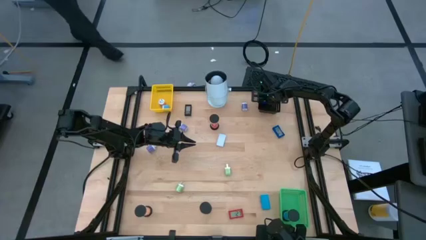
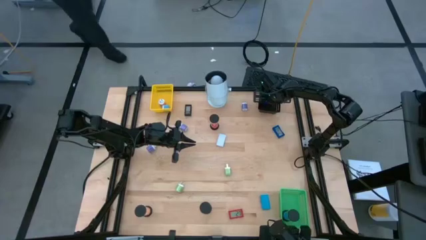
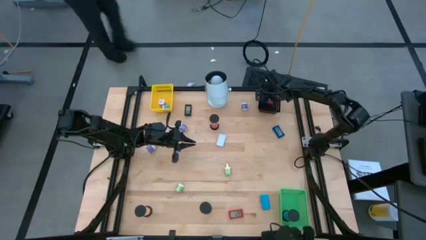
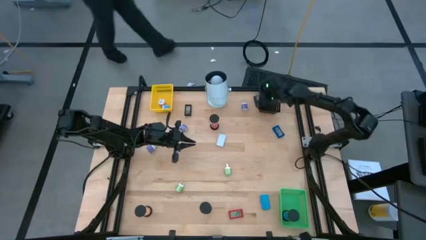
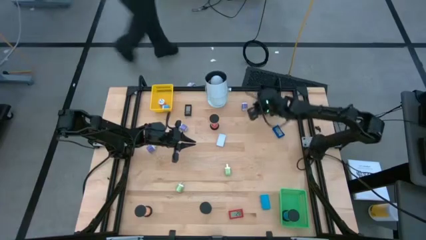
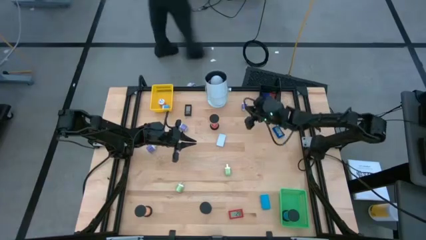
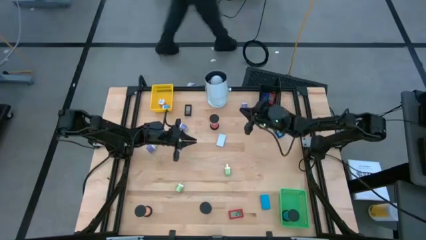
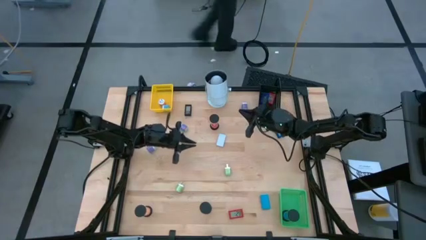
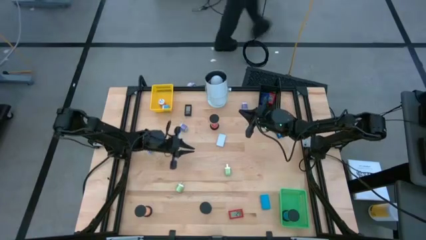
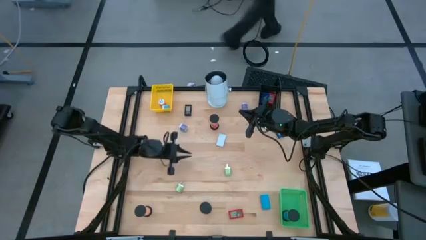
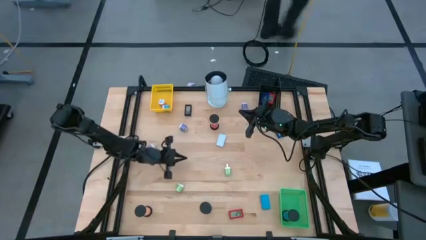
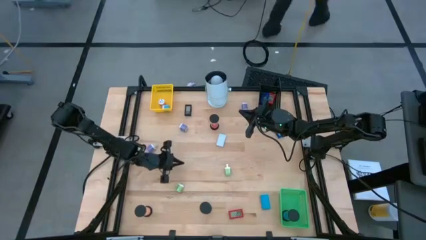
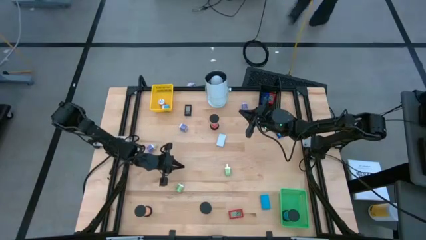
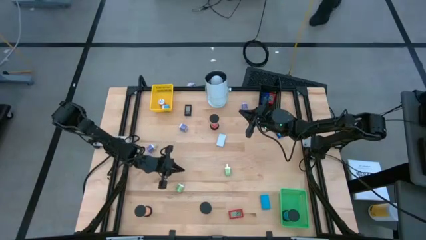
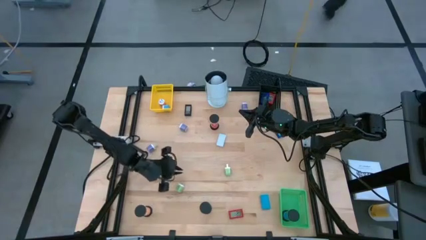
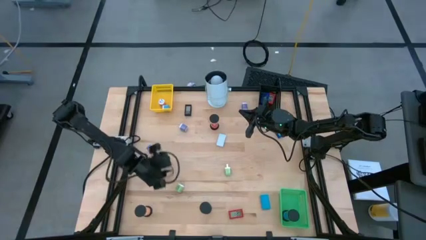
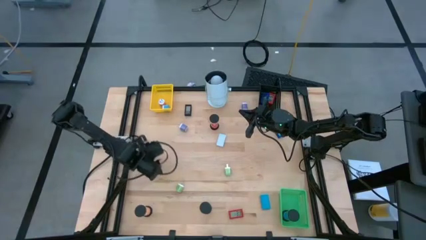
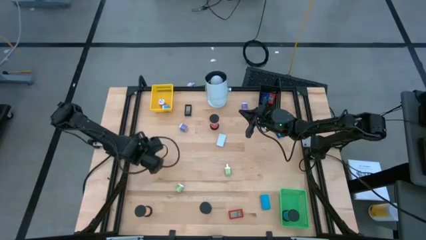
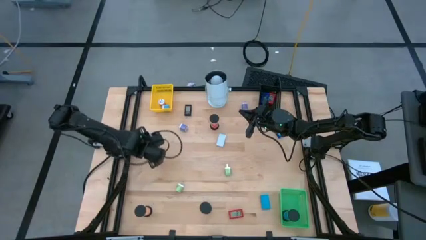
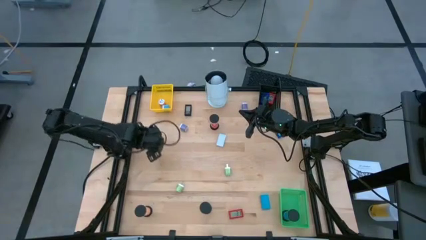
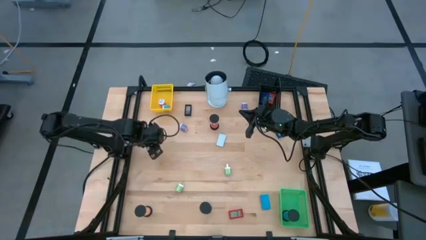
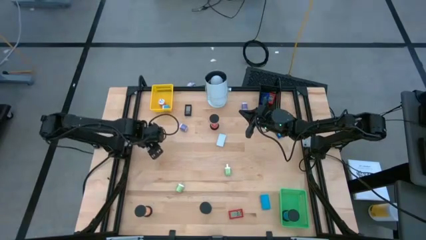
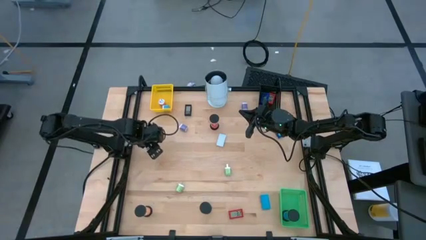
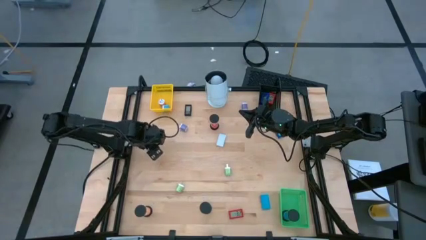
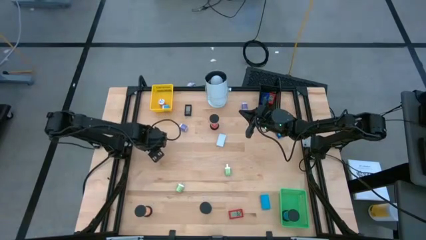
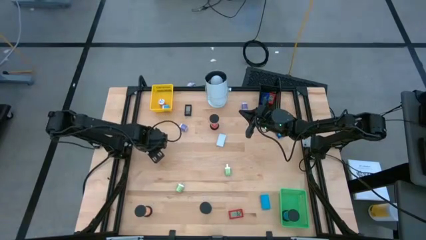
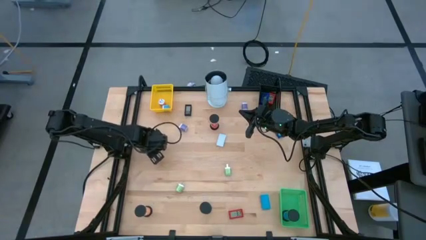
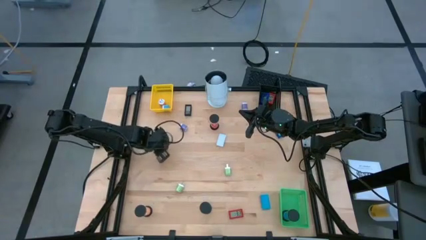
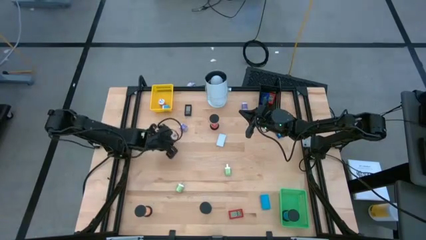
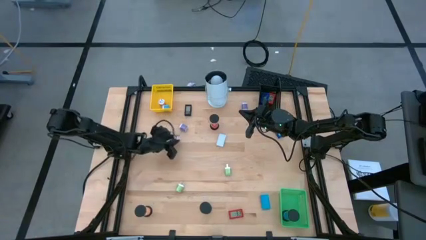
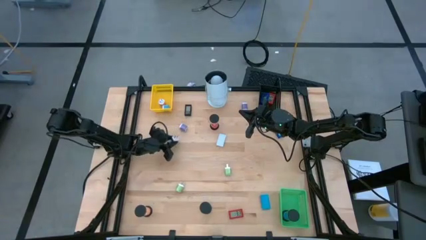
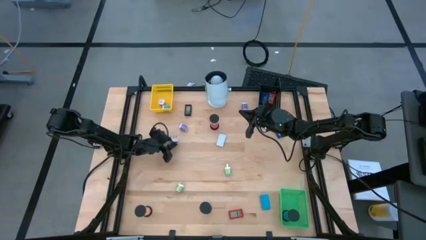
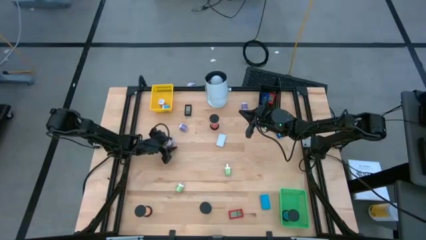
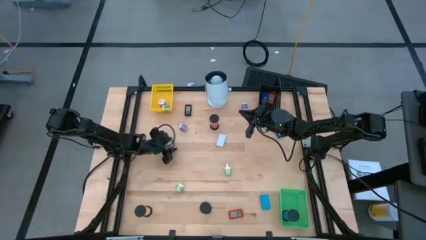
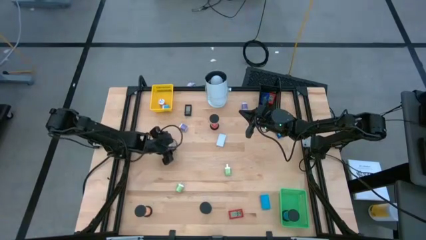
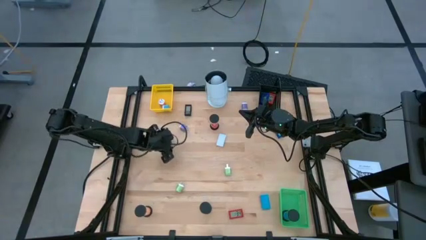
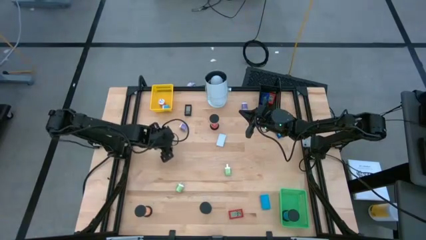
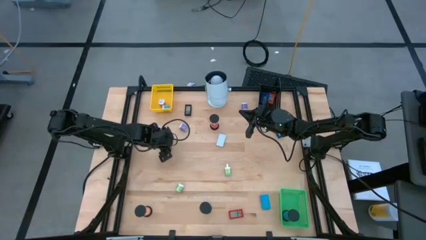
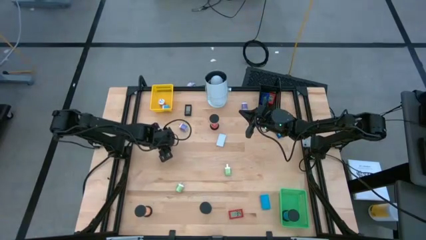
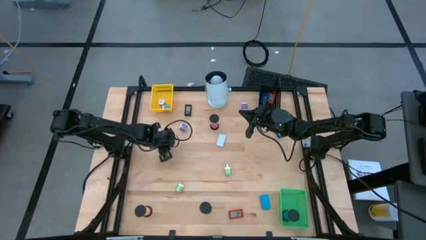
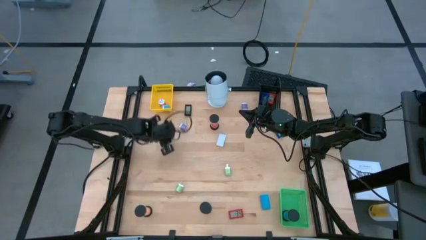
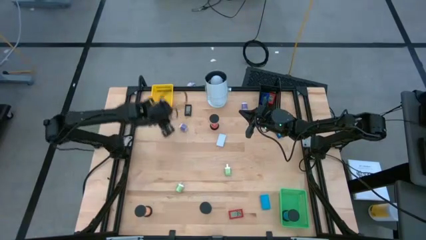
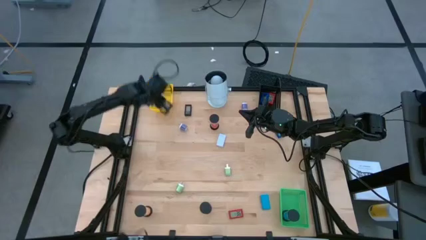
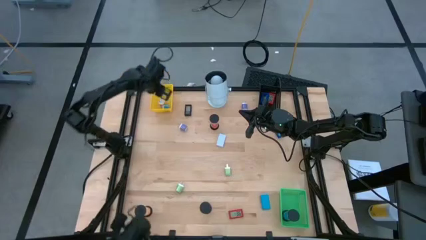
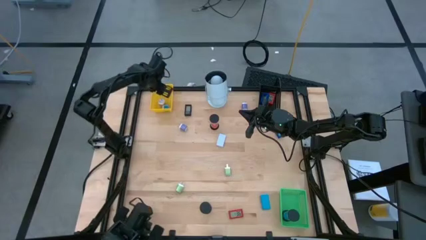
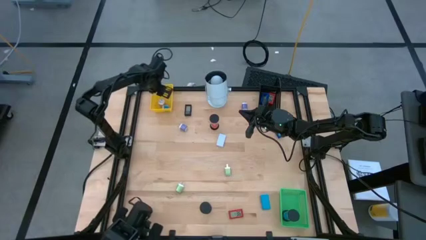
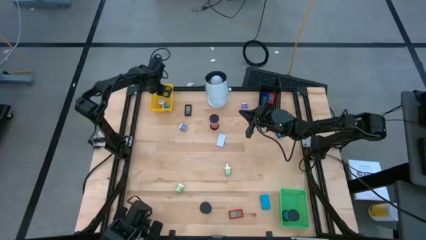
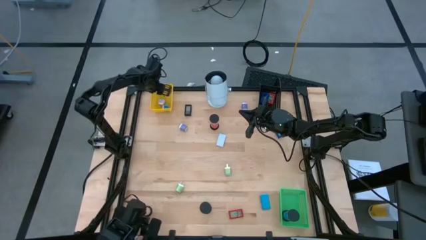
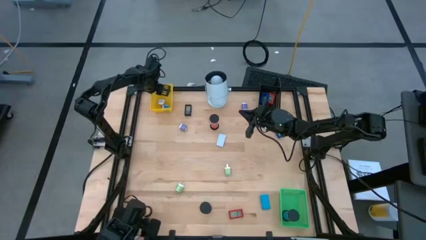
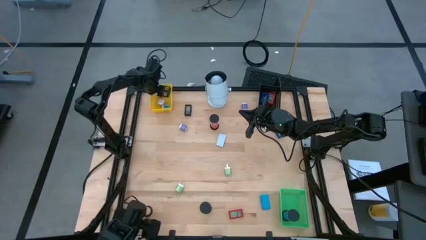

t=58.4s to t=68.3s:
Task: Pick & Place Office items
Put the blue charger adapter into the yellow bin

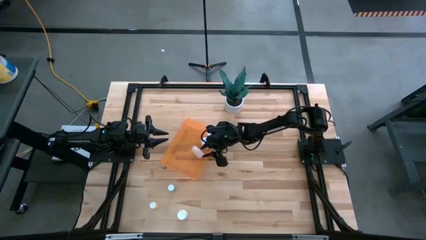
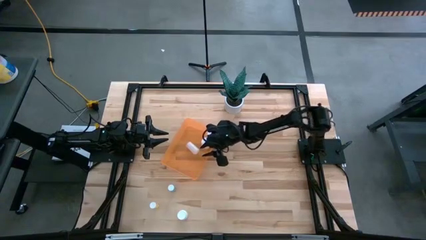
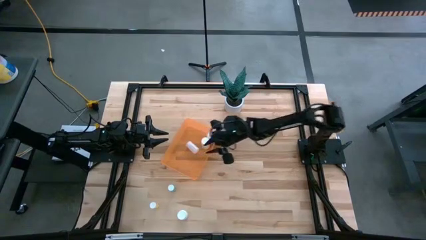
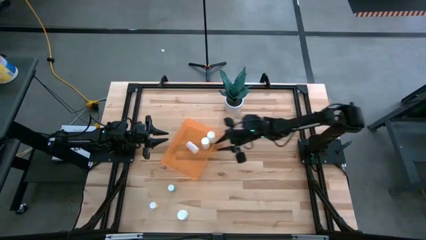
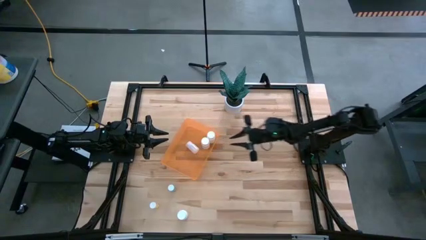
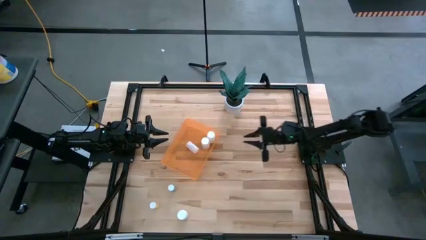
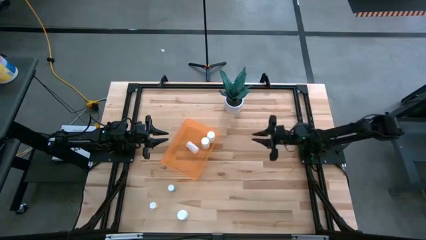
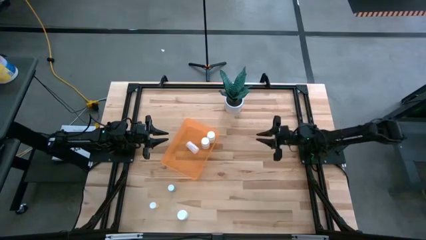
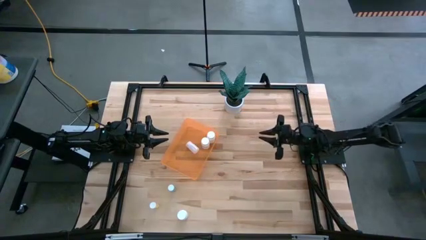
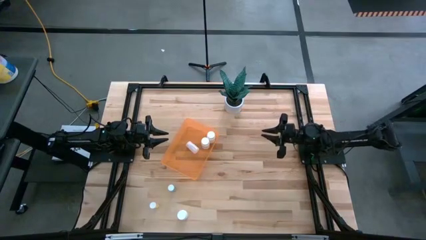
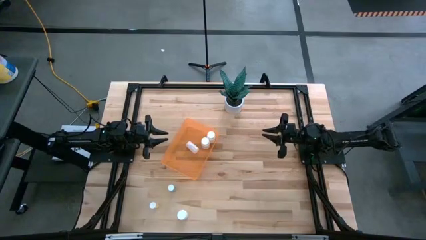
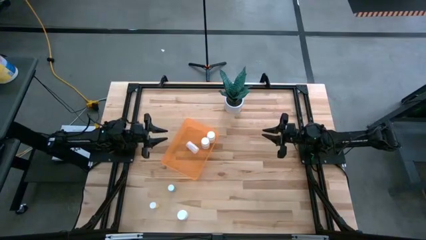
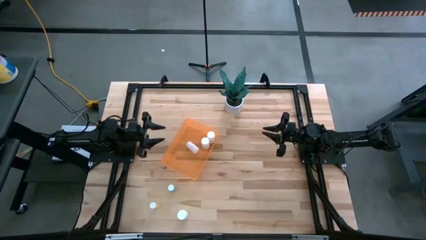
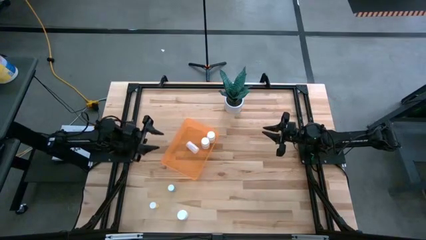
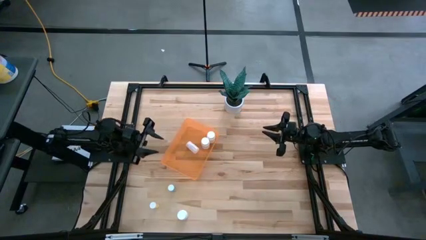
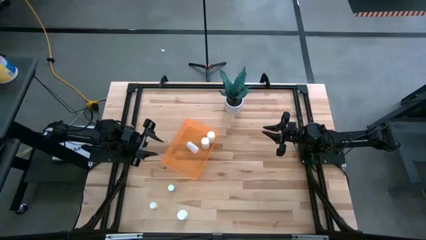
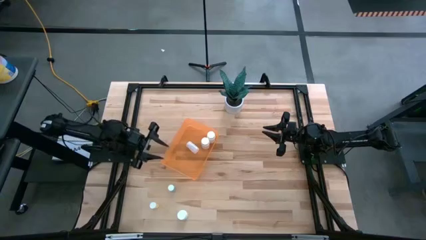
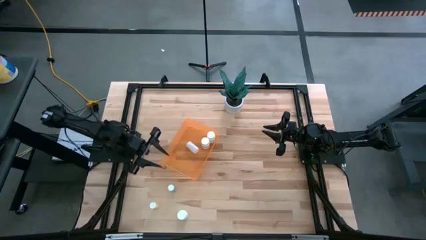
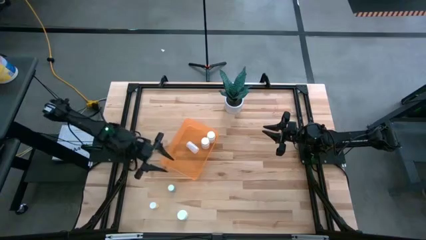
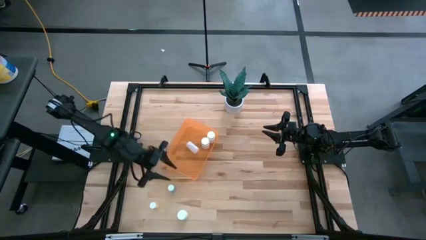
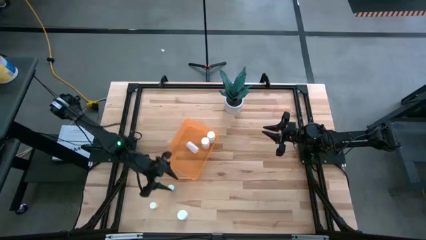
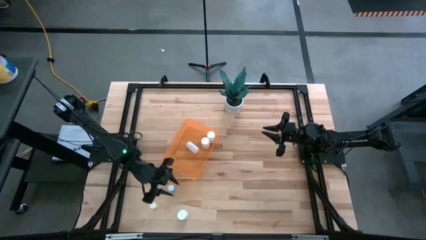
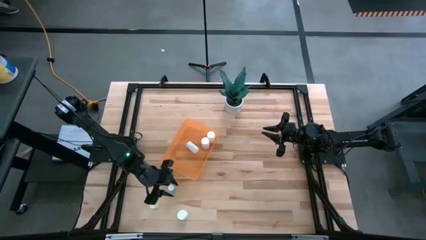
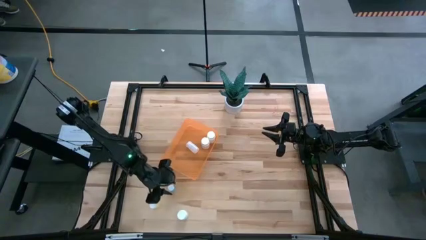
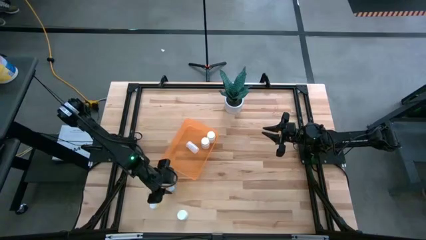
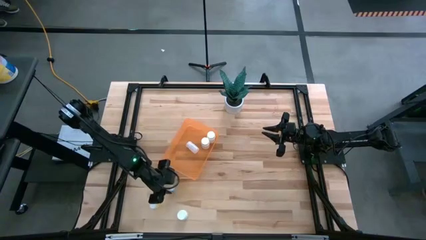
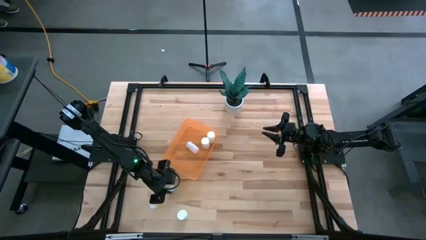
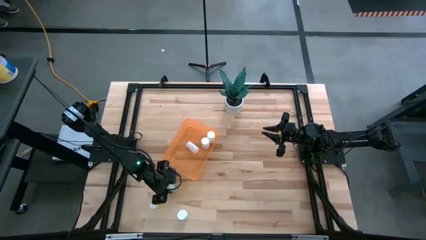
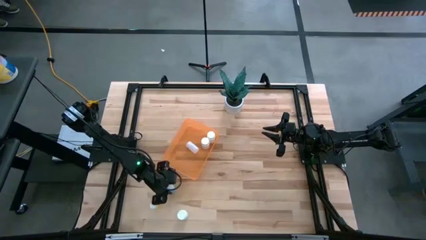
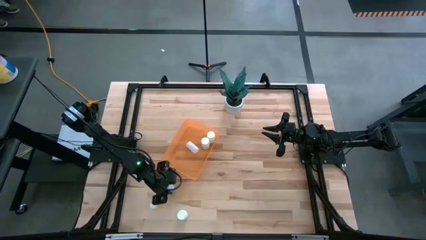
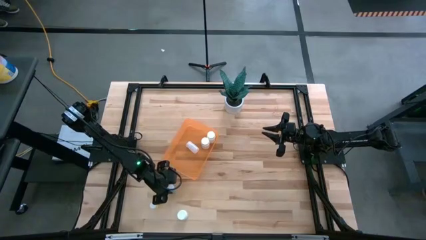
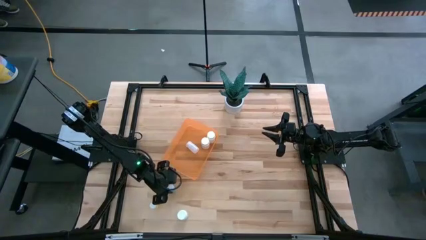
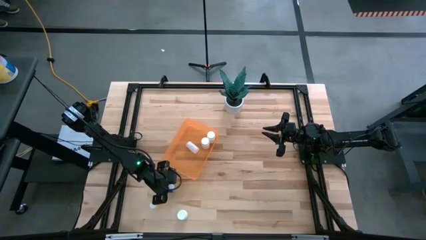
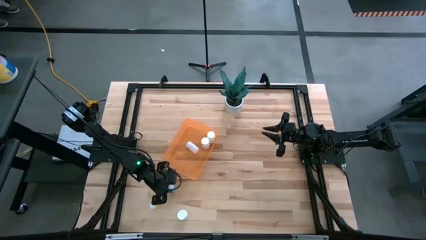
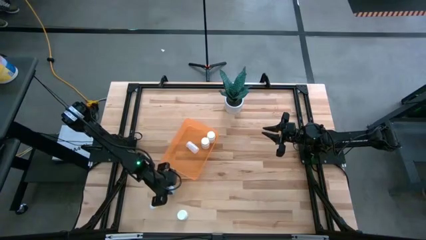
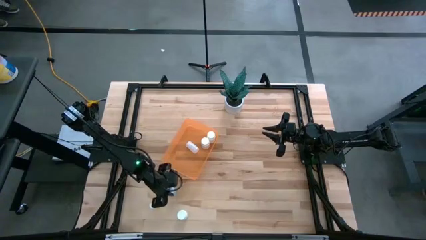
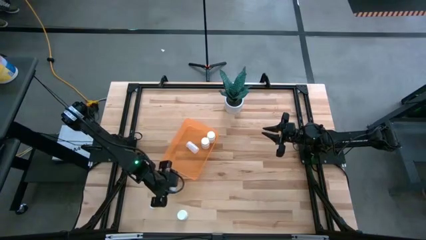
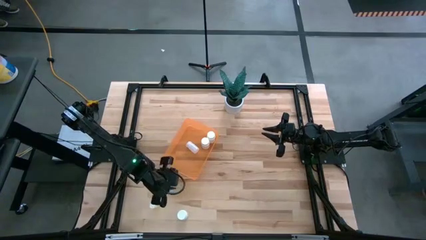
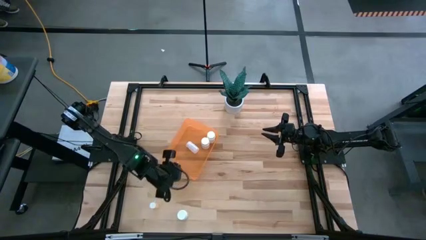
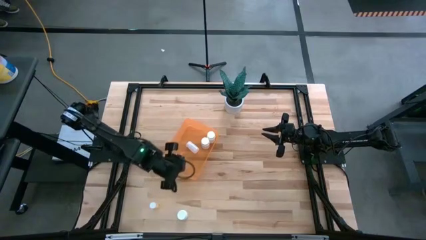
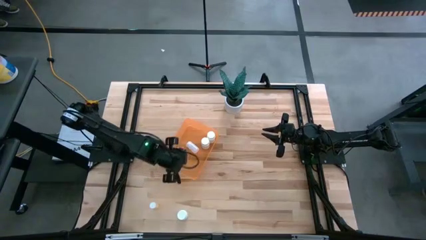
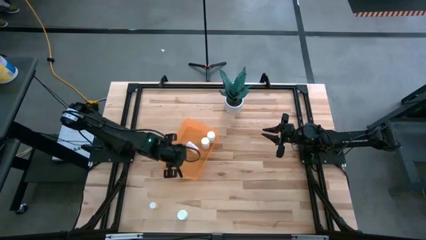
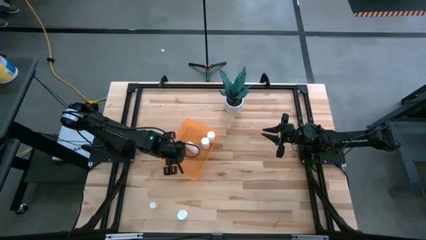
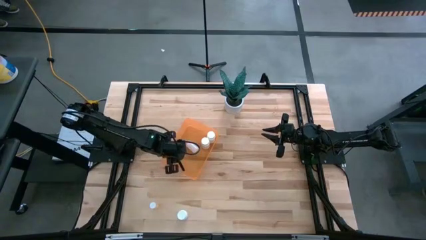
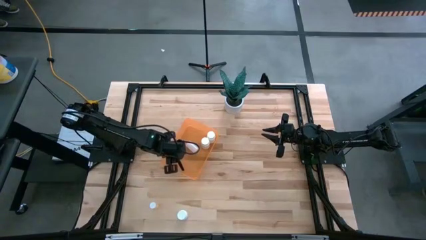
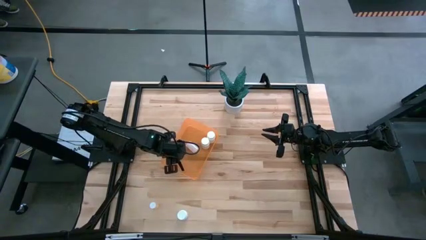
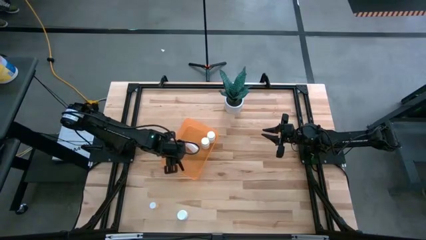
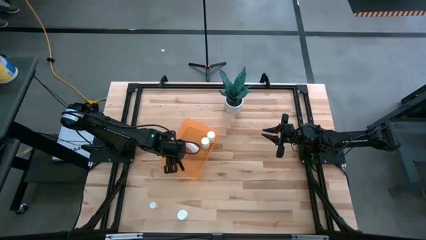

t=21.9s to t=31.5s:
Task: Pick and place pill bottles into a basket
Put the blue pill bottle into the orange bin
